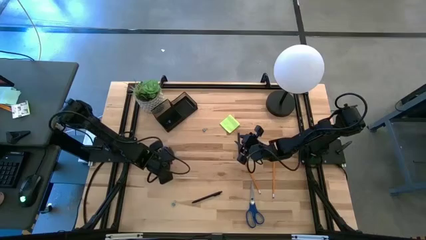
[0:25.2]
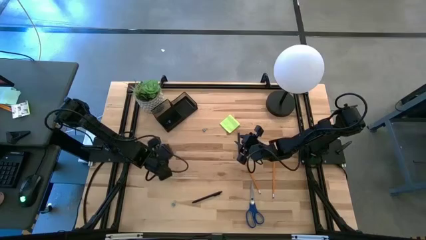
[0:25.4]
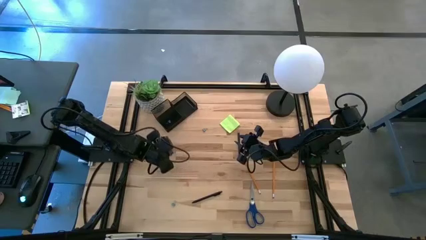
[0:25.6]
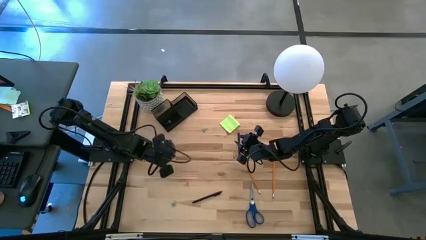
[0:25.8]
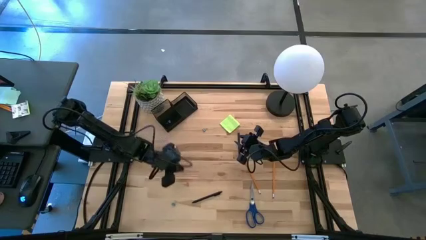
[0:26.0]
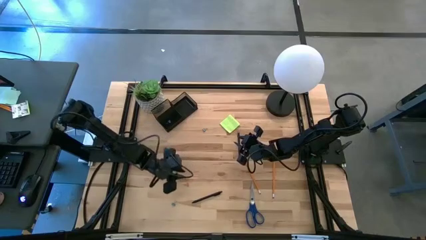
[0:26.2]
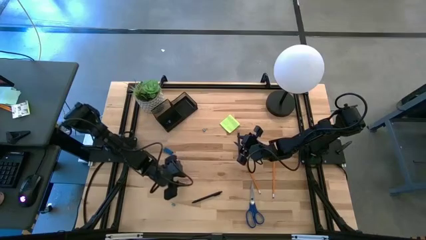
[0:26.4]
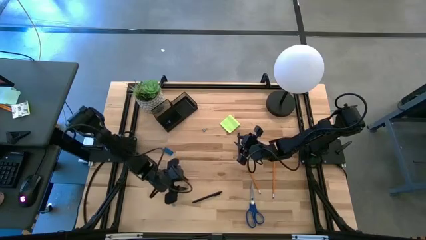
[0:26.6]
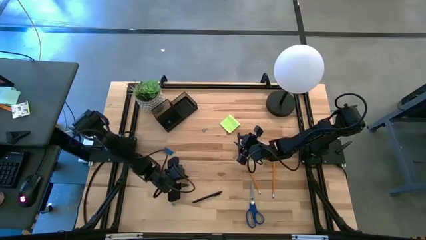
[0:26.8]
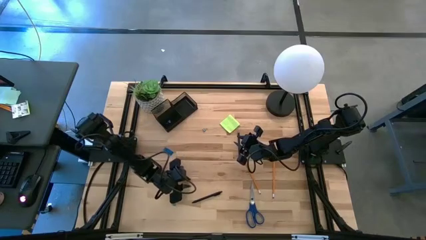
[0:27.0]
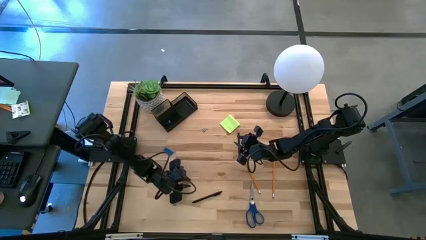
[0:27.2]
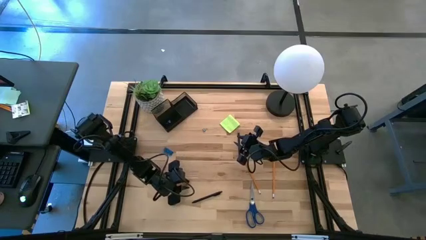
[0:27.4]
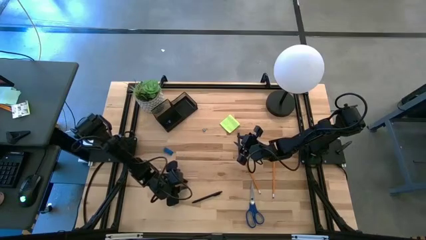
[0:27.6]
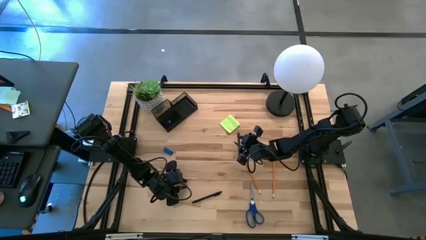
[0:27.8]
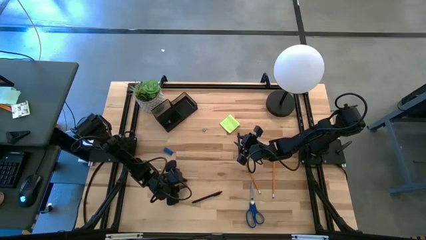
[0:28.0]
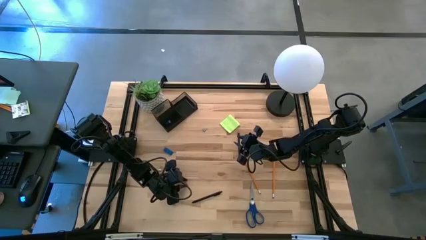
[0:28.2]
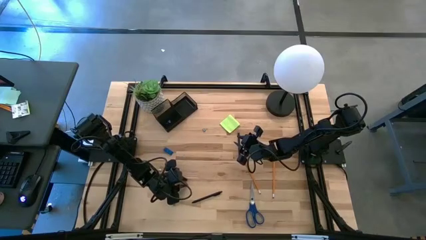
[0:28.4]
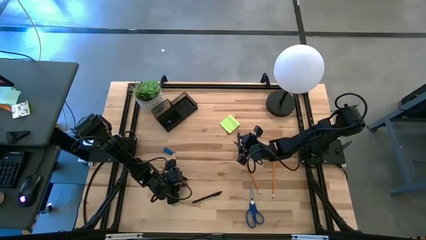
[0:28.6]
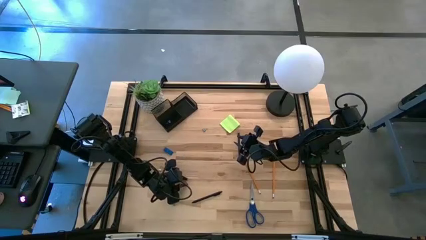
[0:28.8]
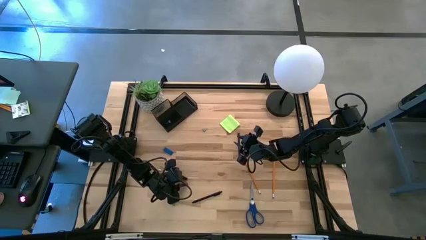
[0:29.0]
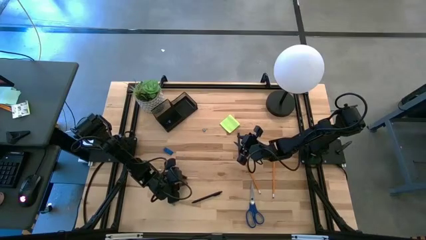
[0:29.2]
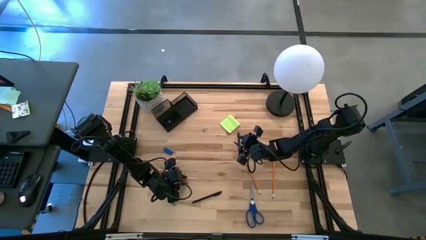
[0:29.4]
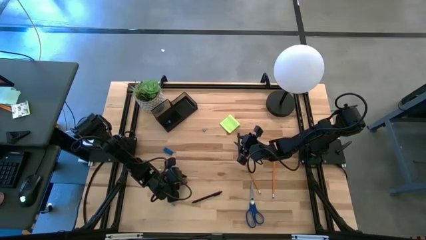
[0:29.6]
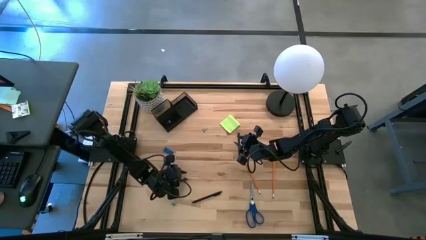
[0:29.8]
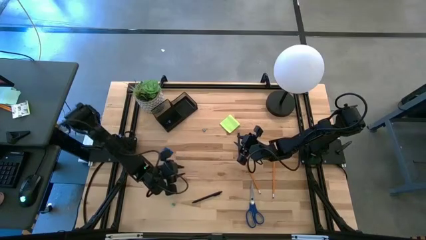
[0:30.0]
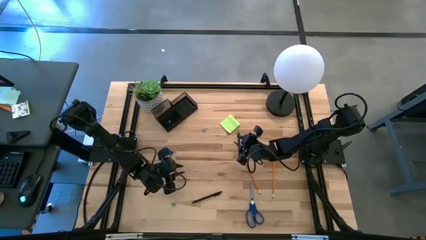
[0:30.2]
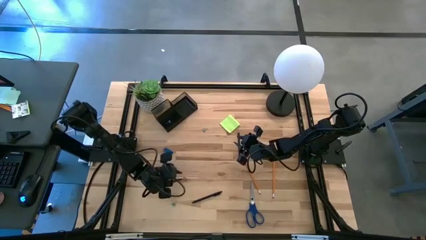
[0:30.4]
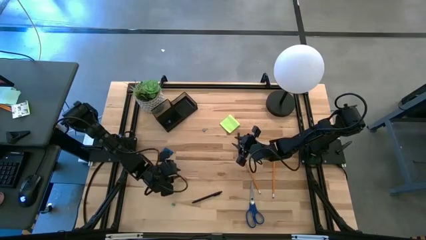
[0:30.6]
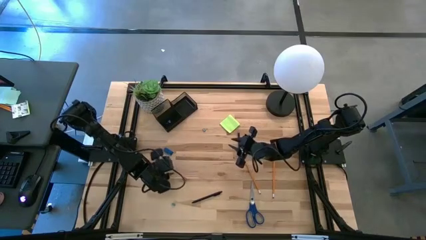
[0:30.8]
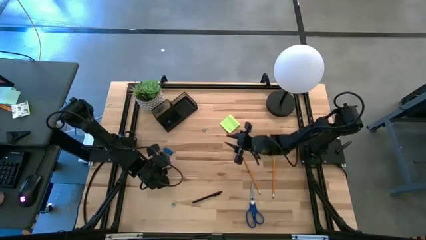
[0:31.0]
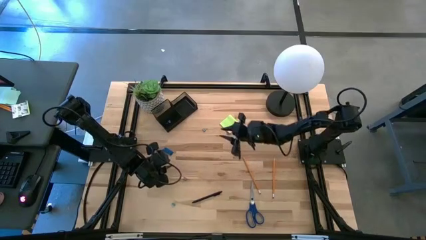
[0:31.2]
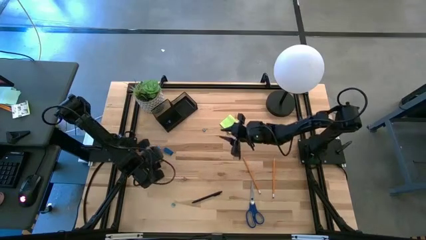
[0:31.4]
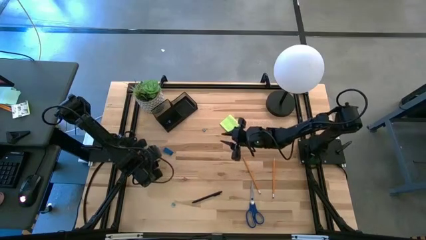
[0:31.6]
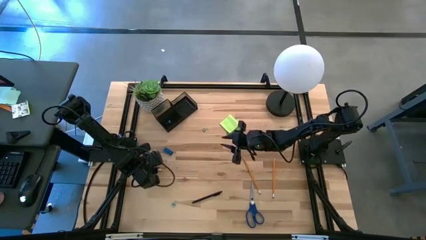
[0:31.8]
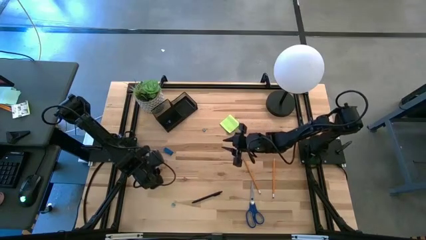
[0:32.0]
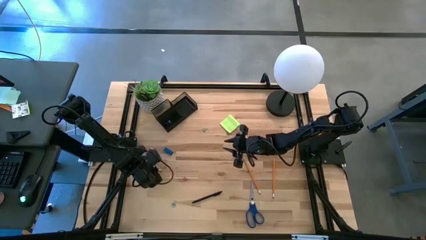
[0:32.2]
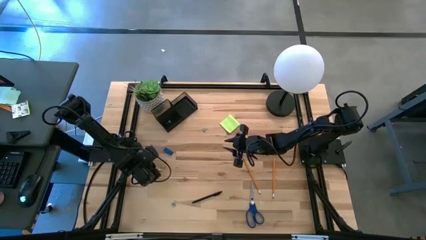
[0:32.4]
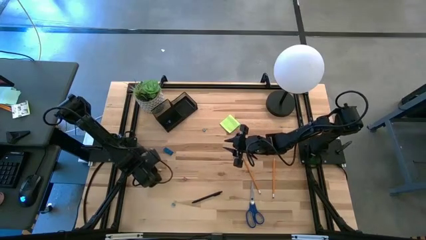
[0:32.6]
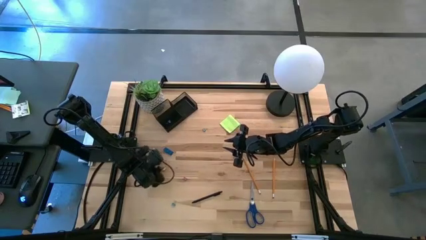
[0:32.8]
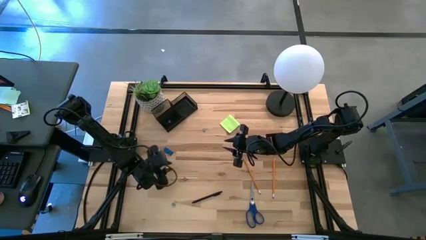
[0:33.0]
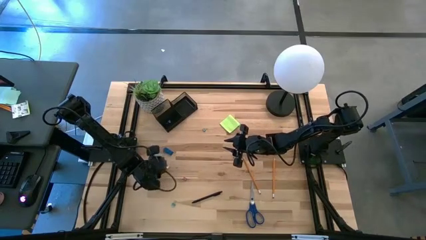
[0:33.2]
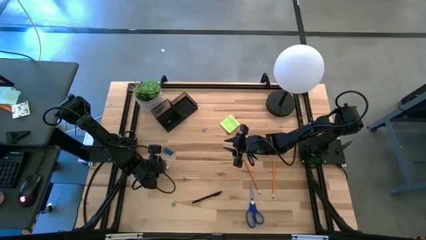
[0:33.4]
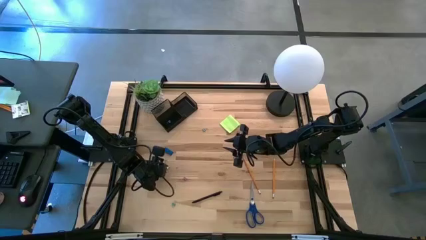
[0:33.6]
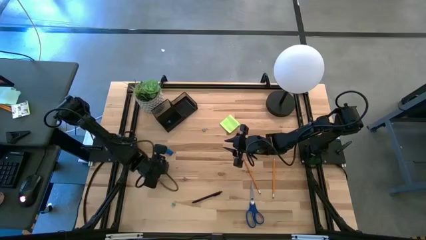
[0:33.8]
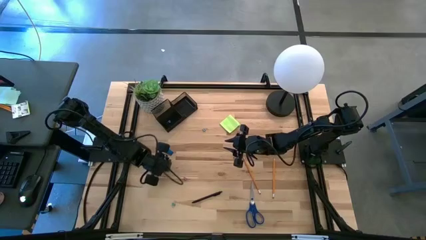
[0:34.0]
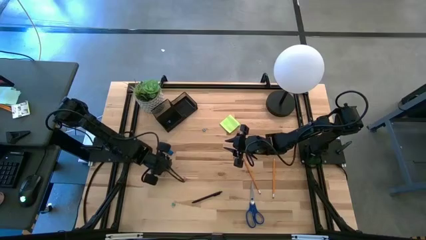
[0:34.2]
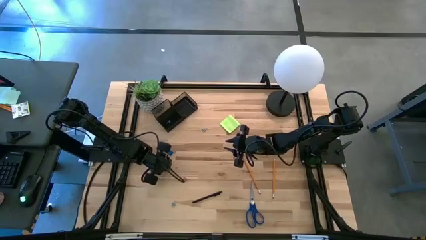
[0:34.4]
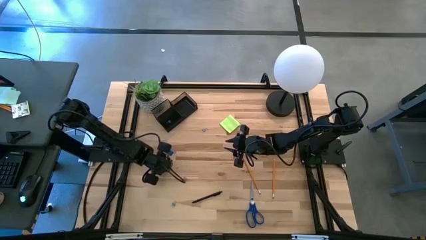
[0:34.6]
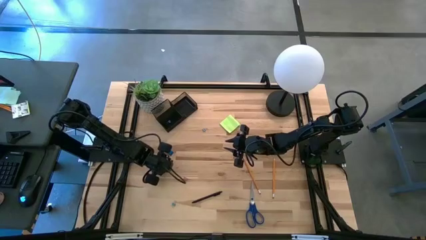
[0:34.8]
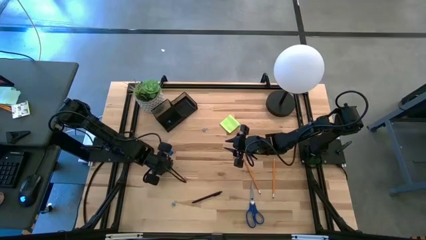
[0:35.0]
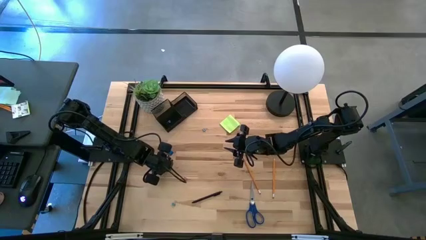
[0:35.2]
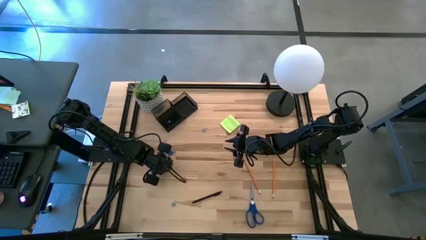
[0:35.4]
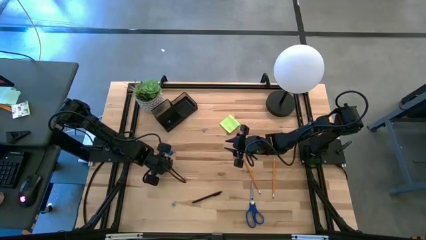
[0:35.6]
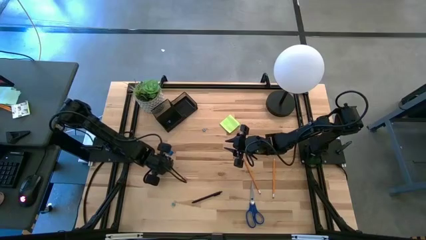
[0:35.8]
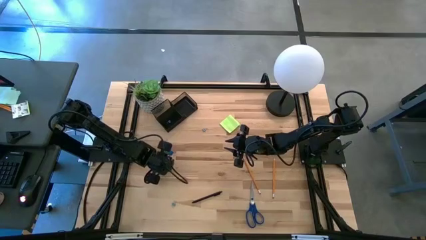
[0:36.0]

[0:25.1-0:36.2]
Task: Pick and place office supplies into organizer
Put the yellow binder clip into the desk organizer

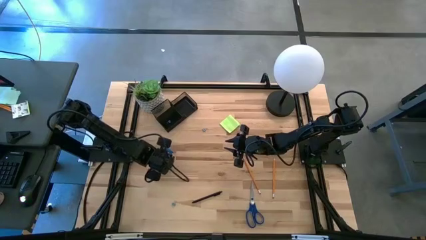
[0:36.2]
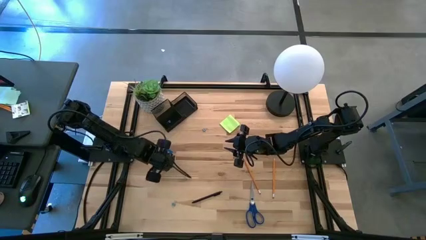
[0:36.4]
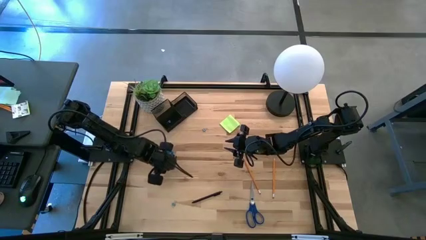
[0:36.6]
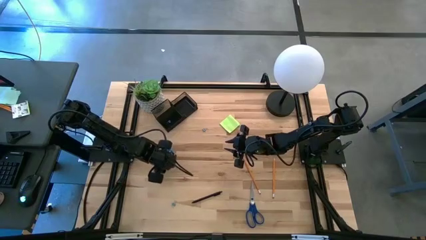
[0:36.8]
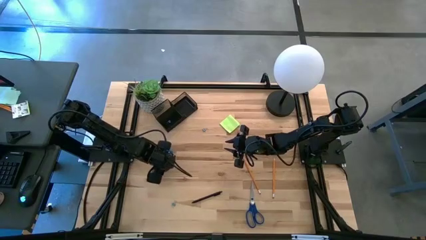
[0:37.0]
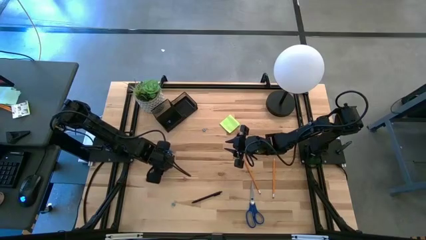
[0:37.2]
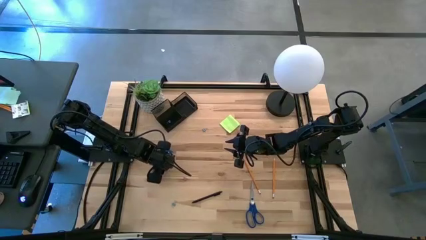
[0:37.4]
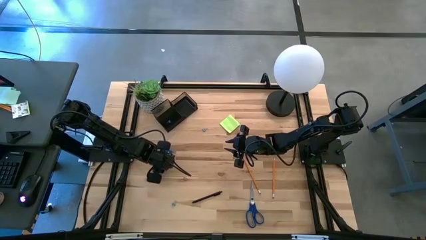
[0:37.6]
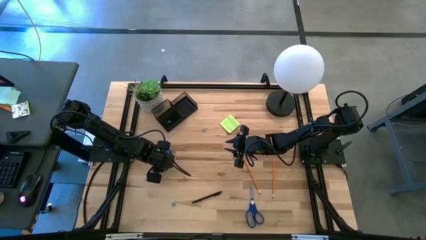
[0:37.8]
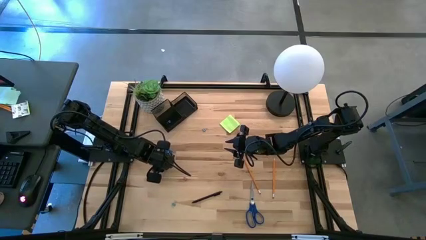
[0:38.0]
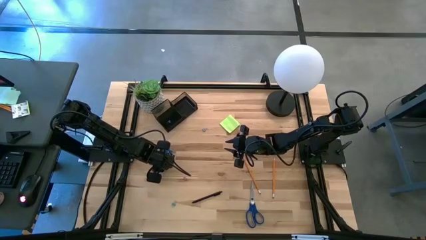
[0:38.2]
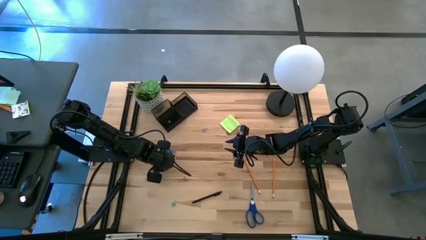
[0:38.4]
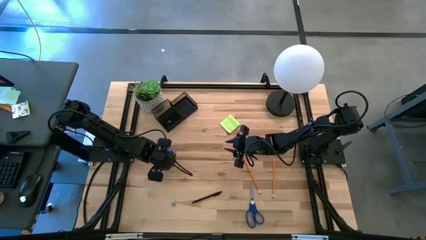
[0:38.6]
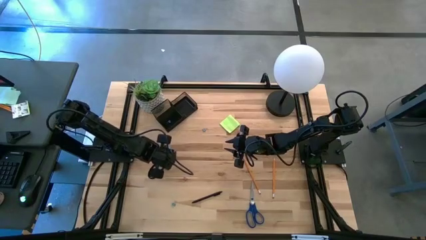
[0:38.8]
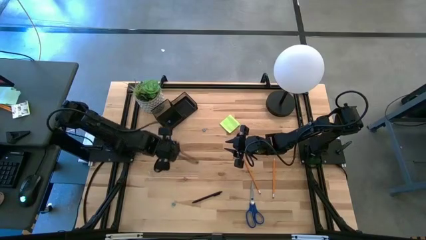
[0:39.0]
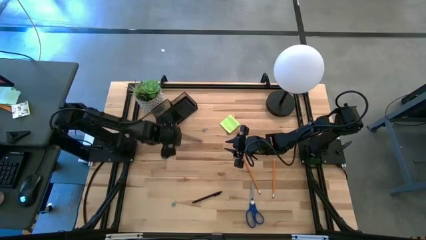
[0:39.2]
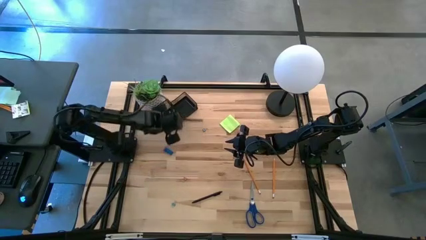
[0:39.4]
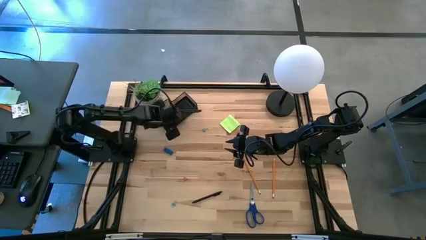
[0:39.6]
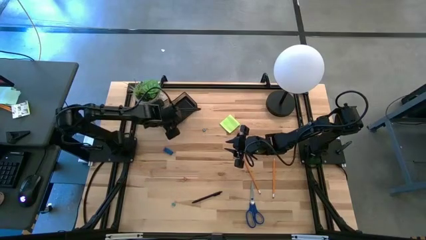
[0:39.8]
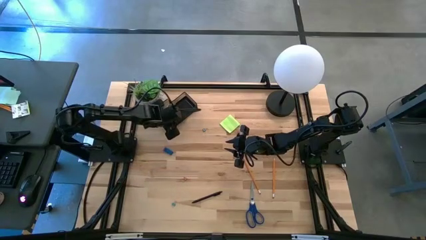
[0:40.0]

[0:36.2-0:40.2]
Put the yellow binder clip into the desk organizer

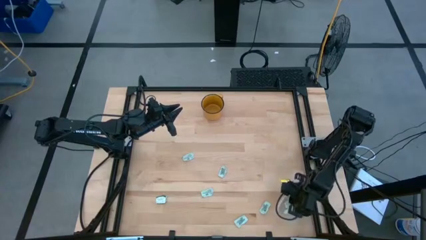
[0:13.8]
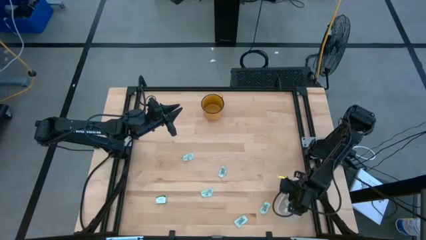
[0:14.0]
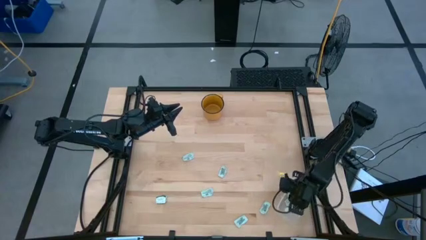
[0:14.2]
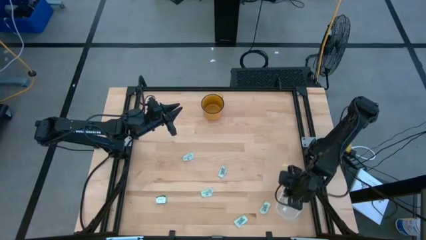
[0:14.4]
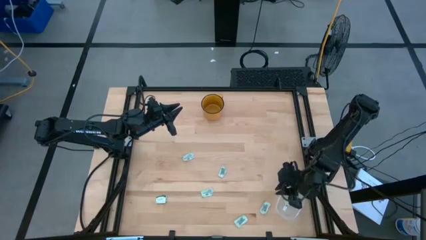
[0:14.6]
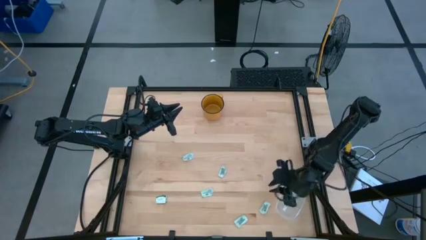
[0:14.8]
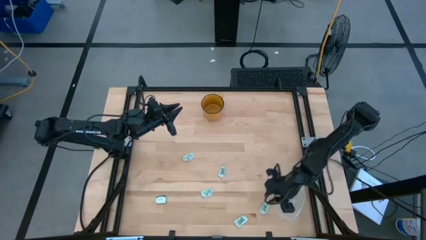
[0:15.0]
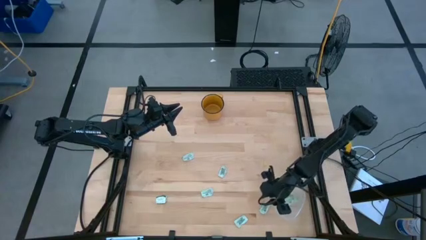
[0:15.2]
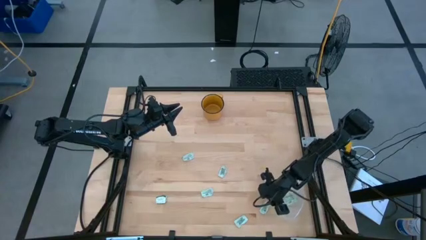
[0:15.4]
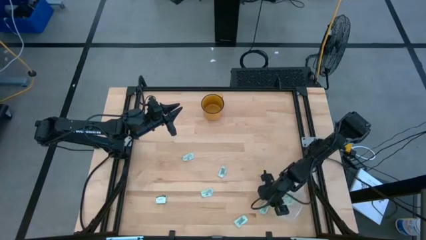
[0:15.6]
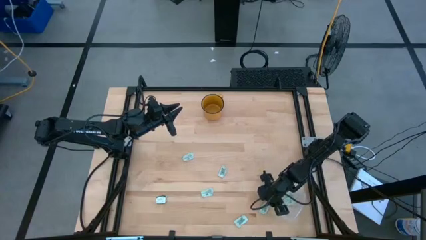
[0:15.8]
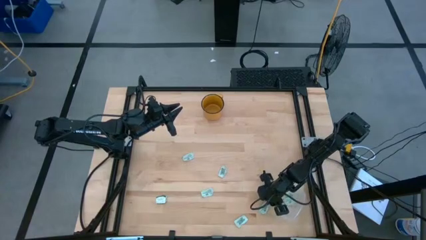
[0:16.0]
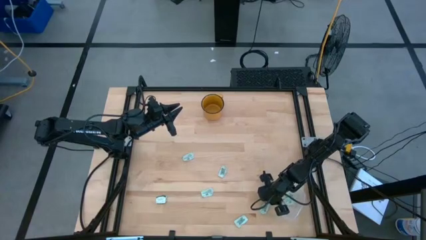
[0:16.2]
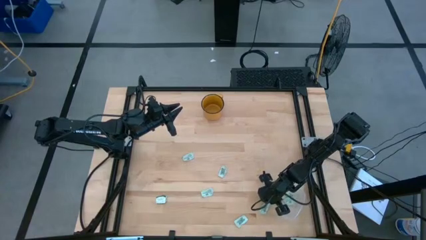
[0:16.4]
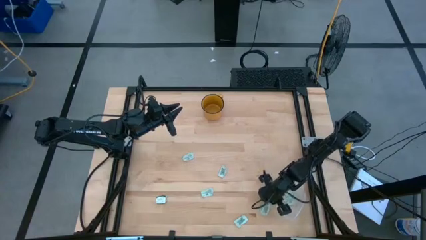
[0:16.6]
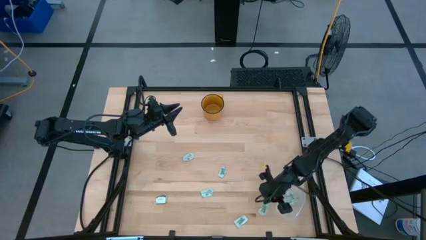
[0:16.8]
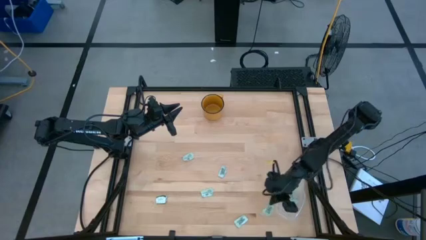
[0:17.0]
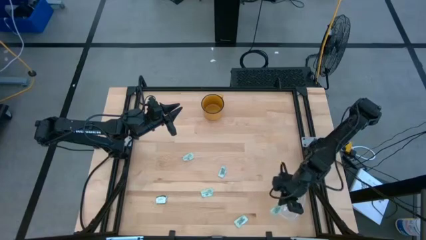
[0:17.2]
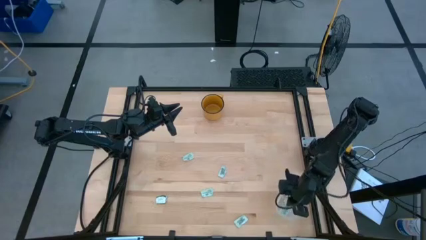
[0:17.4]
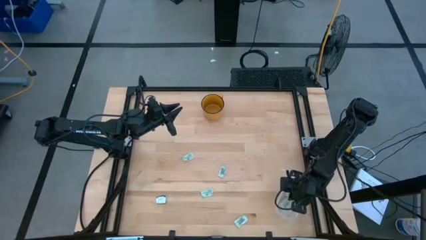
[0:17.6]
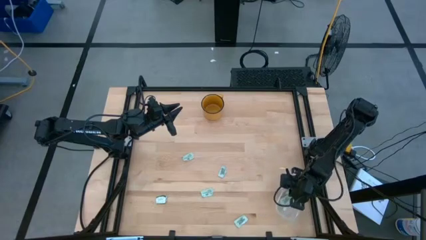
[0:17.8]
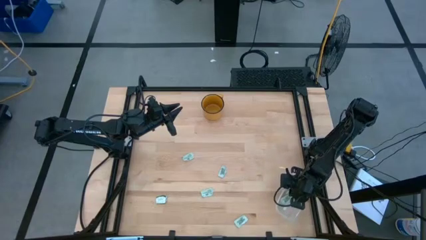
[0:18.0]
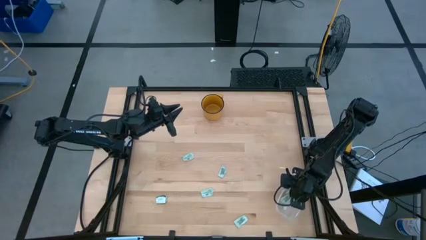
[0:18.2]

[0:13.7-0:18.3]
Task: Pick and place Stevia / Truvia into bins
Put the stevia packet into the transparent bin
